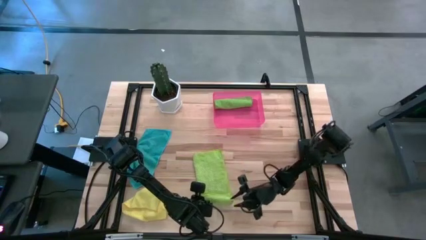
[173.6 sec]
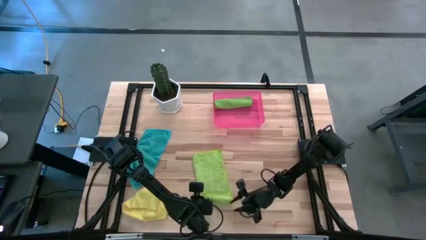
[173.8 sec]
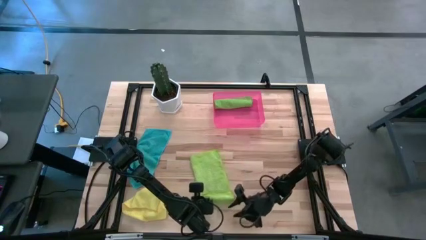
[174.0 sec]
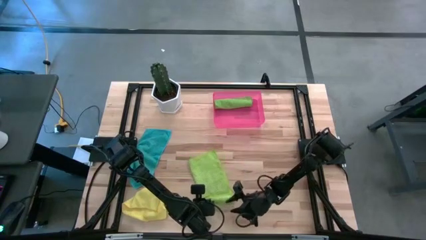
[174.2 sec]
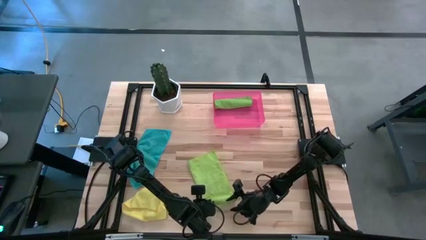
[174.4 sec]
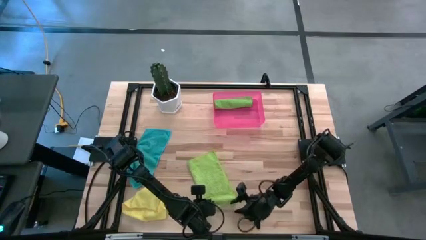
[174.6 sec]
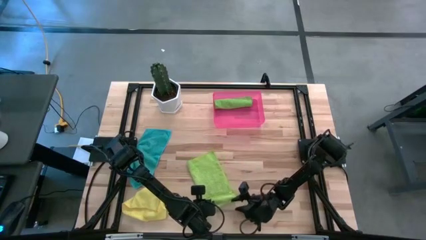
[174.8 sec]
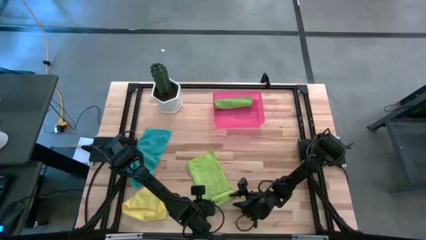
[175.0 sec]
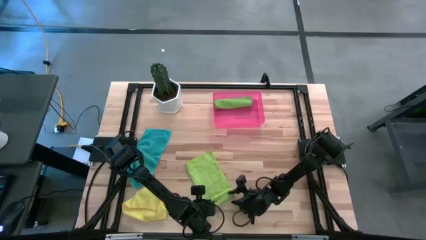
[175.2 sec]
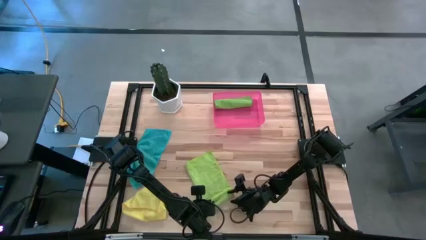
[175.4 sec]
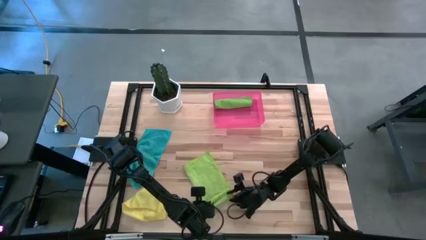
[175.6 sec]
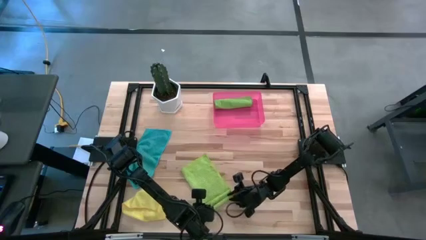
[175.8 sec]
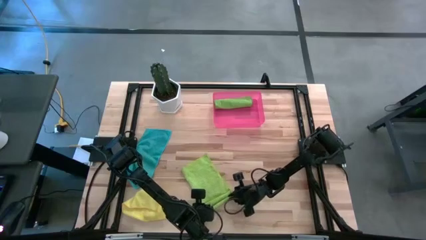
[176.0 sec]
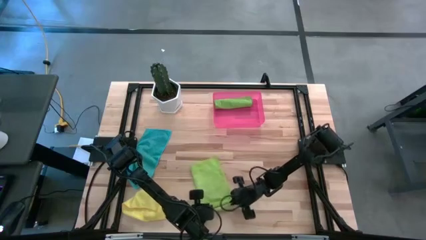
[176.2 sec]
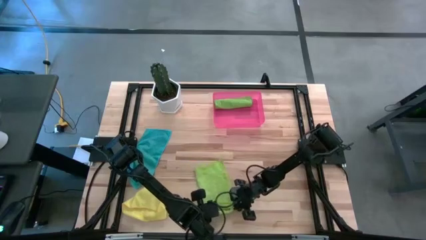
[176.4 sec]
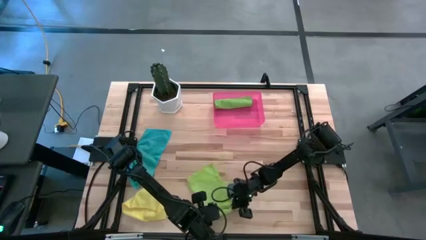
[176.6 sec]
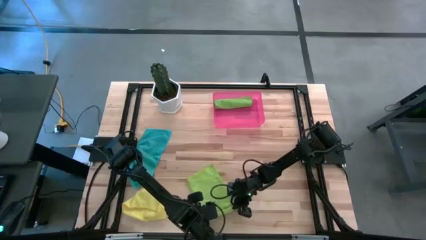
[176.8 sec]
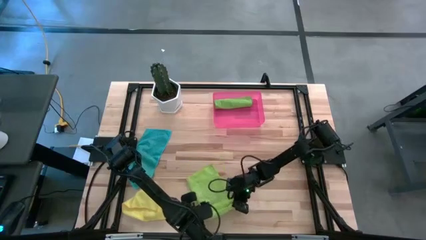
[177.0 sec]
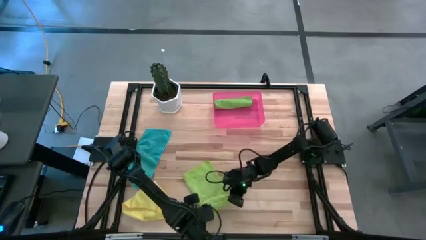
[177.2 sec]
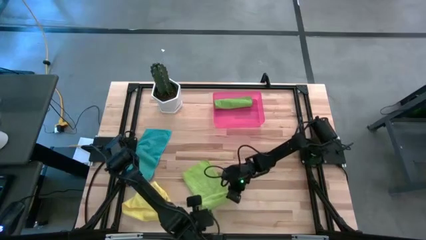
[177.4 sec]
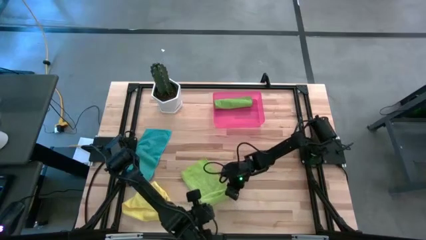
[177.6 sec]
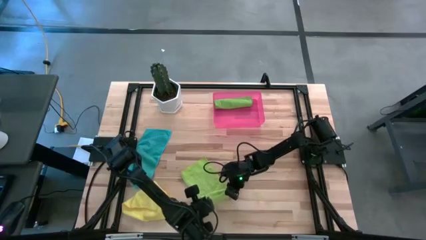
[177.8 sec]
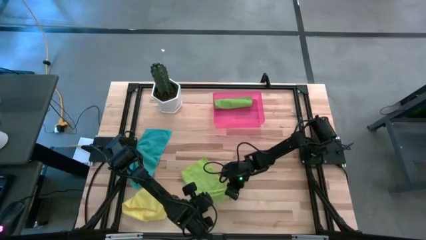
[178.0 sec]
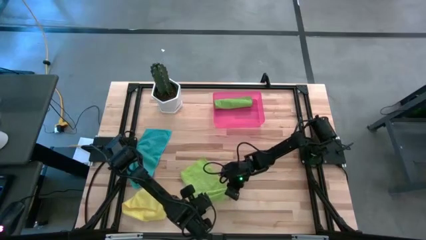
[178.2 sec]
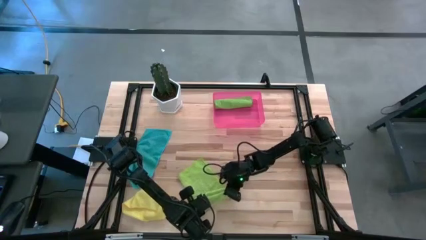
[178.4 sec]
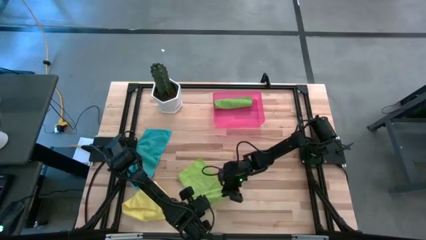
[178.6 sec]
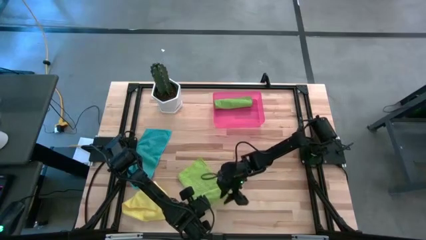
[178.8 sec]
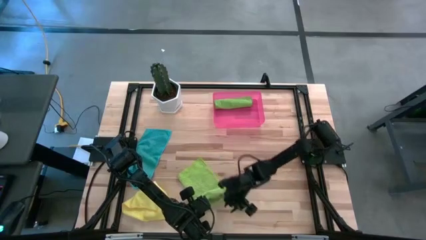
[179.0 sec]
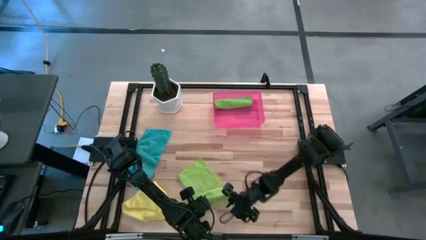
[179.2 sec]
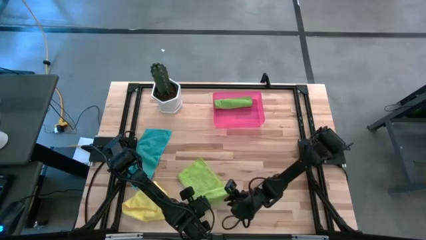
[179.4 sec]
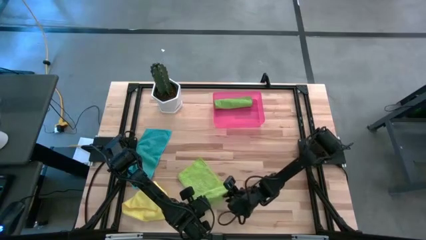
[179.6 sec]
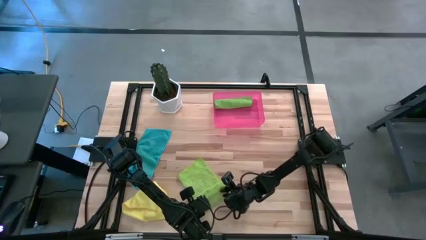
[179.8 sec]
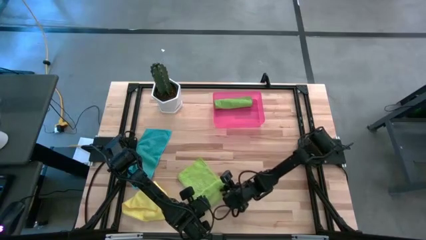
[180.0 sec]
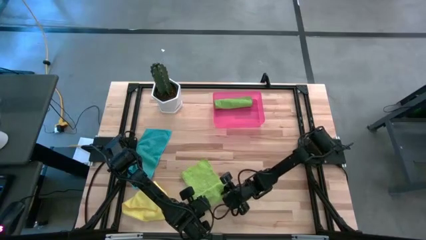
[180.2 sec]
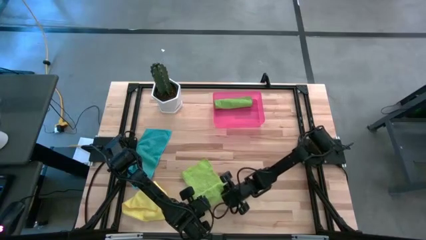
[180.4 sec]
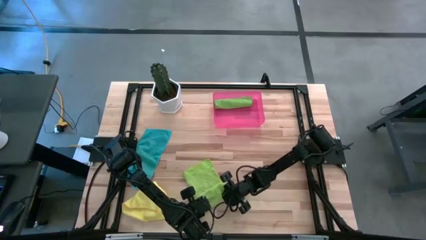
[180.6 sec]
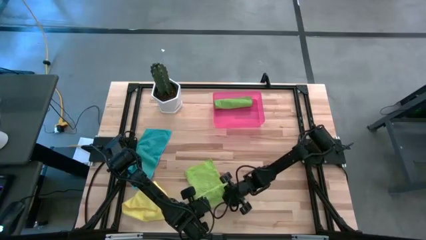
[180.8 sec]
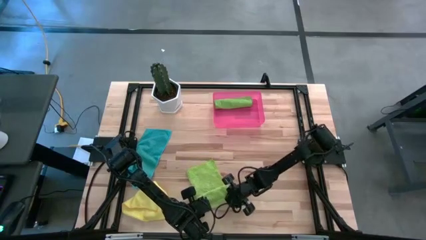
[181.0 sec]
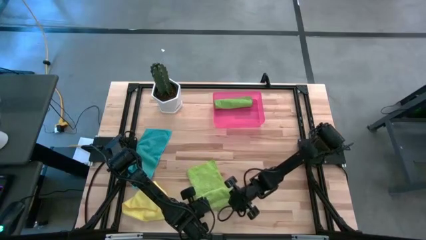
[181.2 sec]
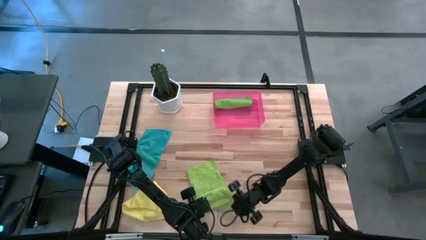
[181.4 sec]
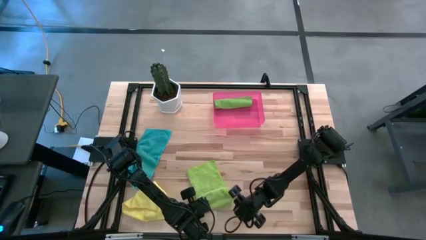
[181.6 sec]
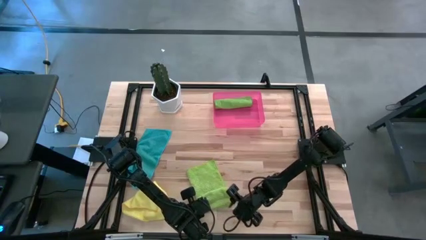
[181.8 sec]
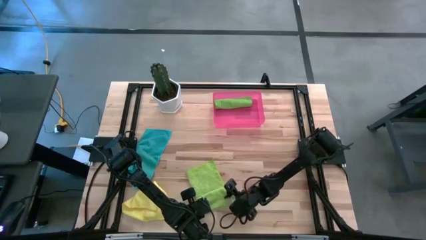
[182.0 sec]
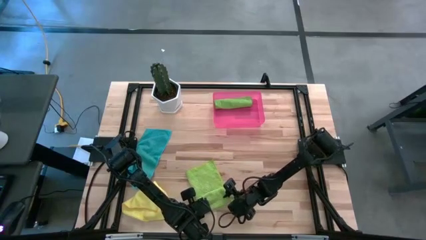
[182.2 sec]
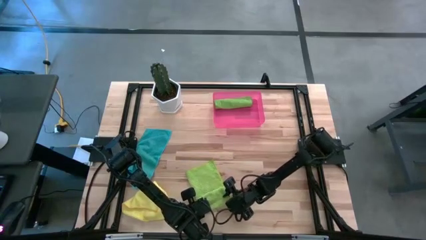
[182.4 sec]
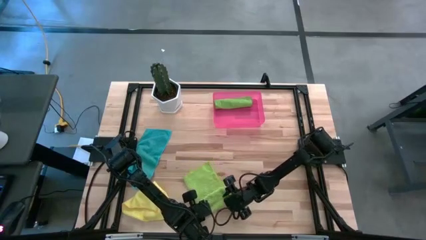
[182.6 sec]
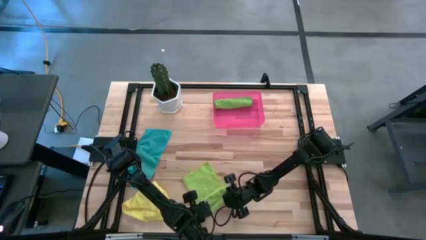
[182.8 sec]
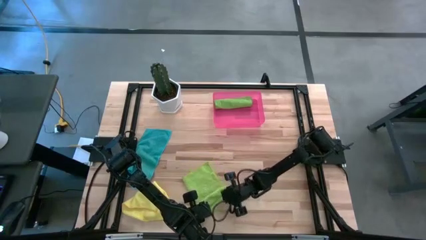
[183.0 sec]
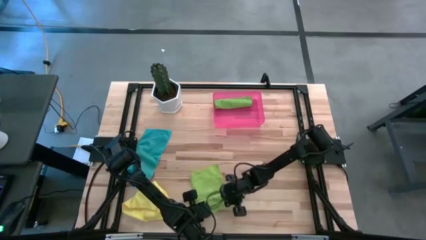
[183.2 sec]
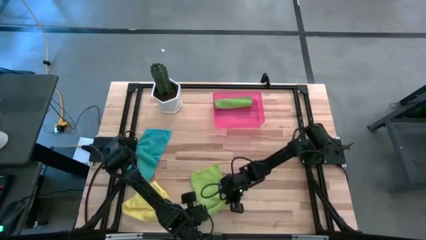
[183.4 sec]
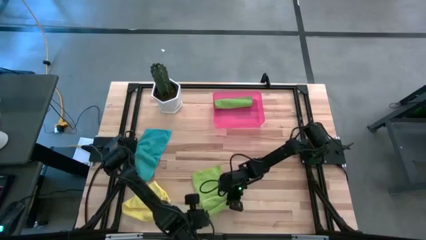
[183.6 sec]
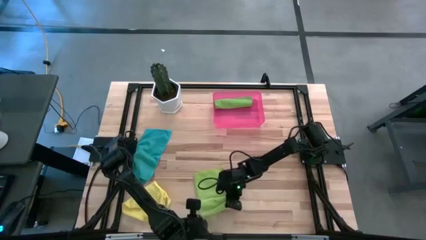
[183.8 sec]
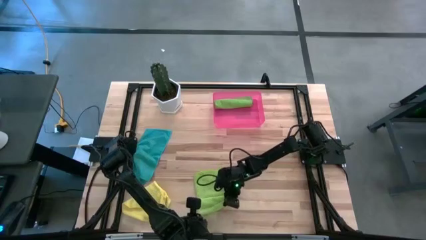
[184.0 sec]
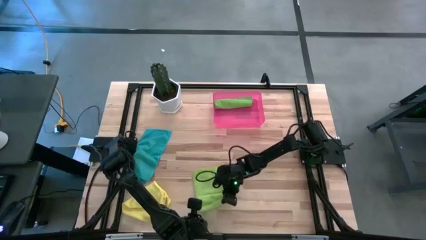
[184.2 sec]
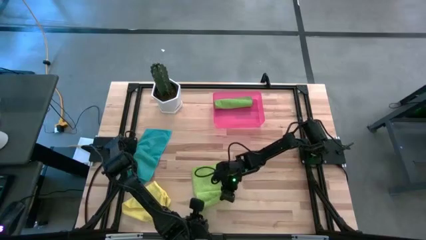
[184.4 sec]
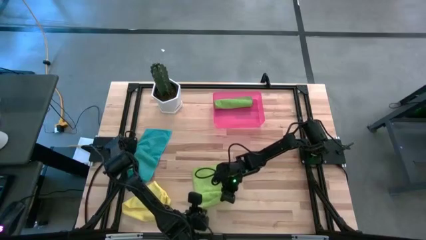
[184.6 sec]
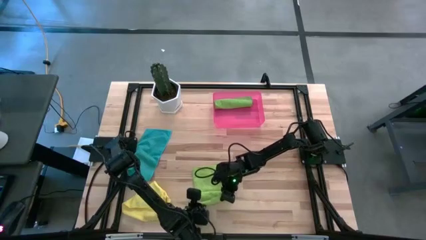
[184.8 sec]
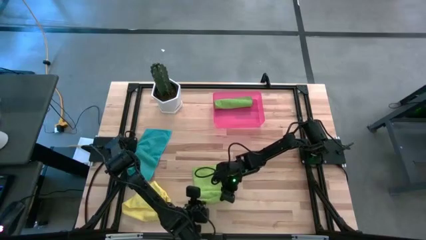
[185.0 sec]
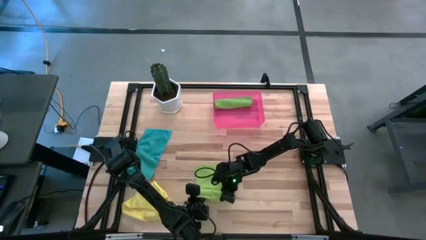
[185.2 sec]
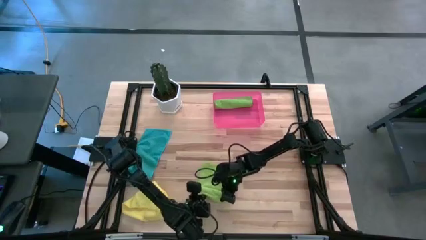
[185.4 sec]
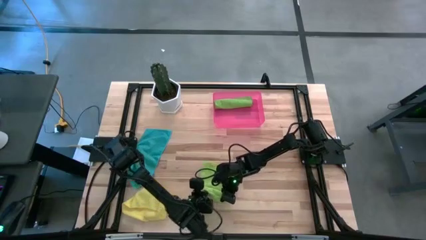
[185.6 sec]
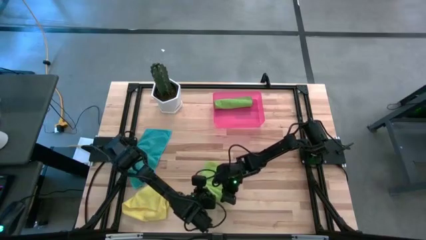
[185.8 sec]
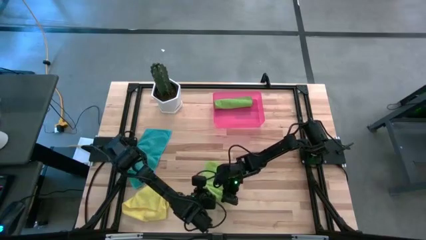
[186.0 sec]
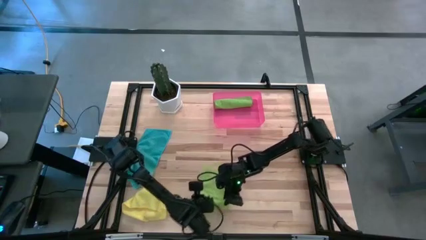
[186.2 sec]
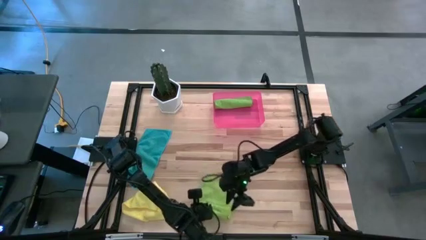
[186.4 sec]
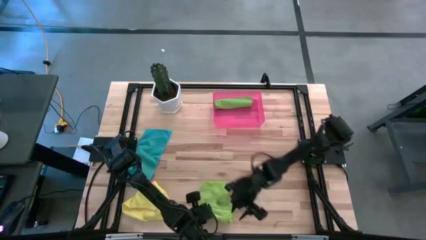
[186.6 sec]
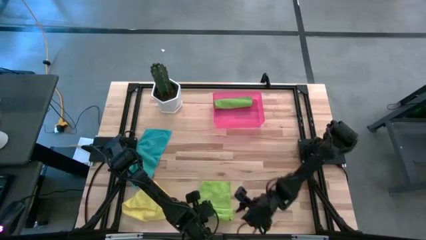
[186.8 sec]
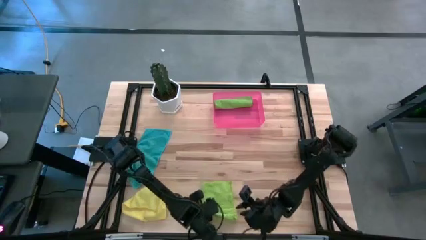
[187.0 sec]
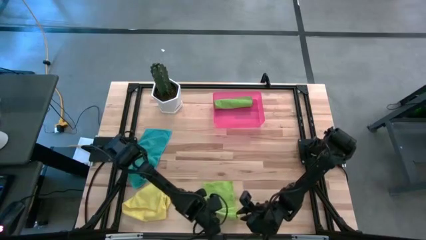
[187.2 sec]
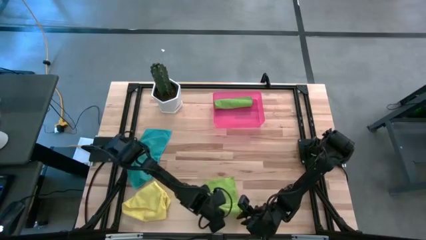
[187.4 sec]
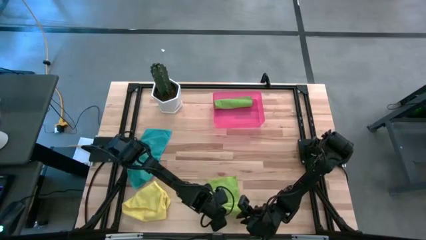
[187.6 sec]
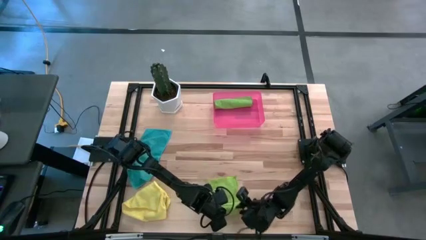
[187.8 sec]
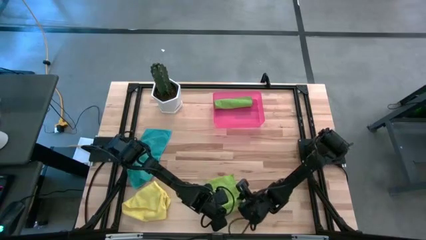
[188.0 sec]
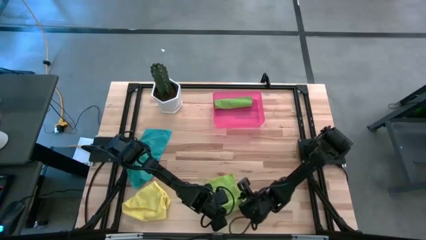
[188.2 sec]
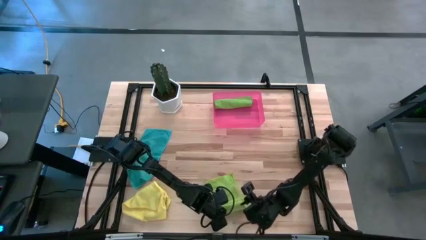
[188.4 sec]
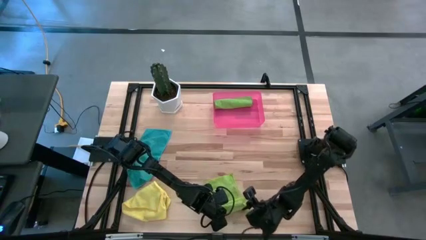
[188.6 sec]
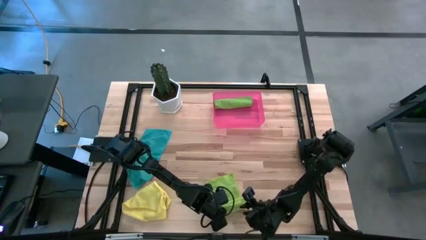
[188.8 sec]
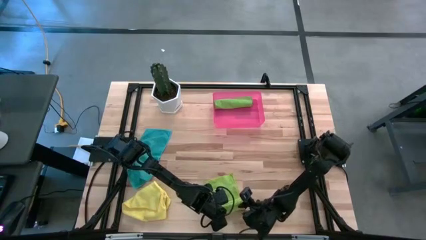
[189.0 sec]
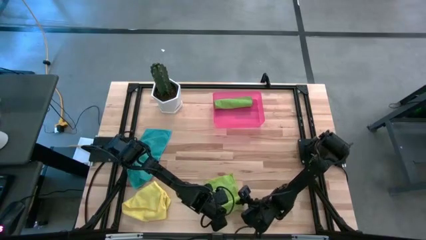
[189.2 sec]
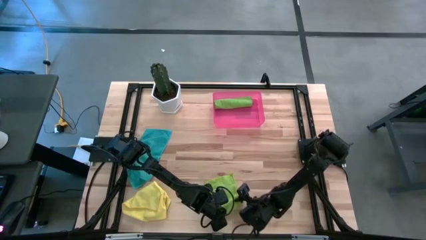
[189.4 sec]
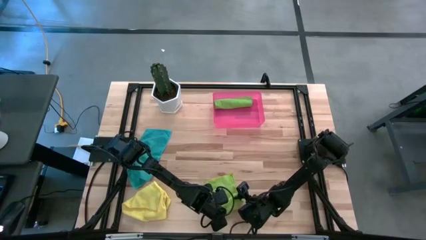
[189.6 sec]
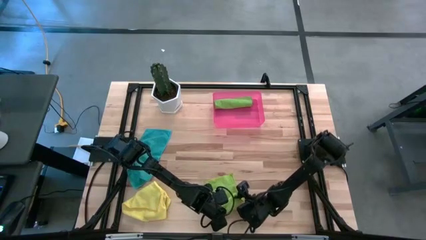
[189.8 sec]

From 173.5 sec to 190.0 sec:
Task: Roll microfiber towels into tight, uniform cylinder then place into a basket
Roll the light green microfiber cloth
